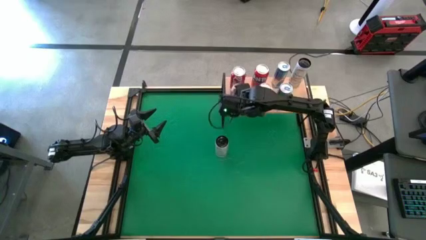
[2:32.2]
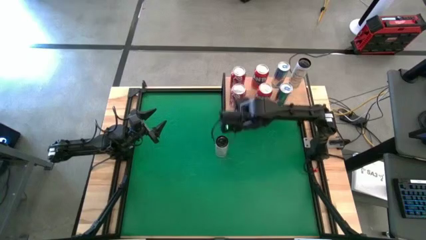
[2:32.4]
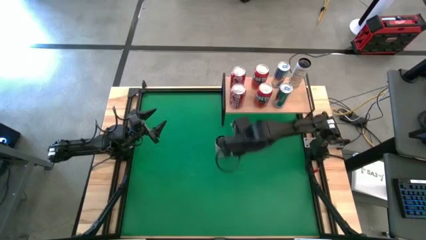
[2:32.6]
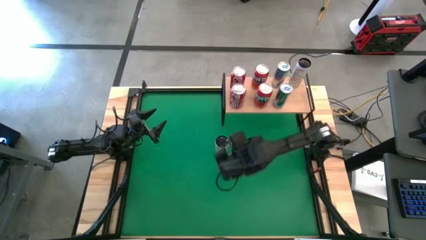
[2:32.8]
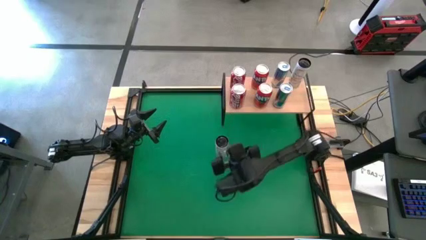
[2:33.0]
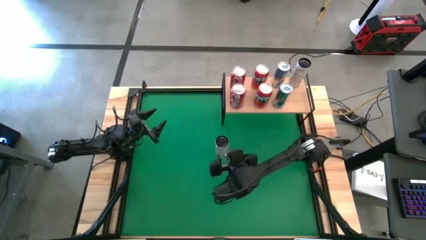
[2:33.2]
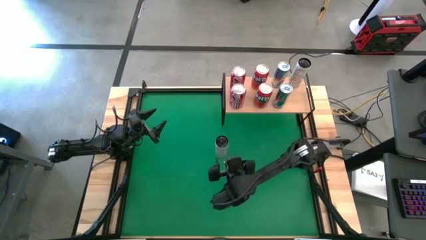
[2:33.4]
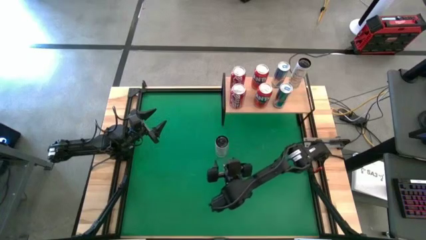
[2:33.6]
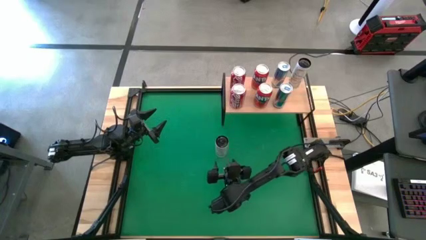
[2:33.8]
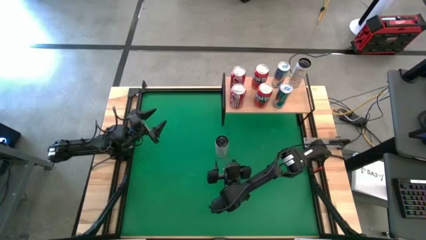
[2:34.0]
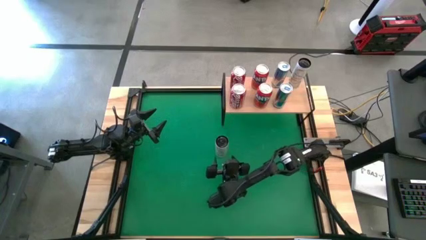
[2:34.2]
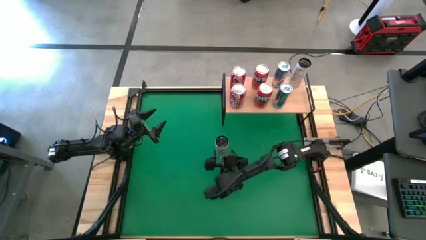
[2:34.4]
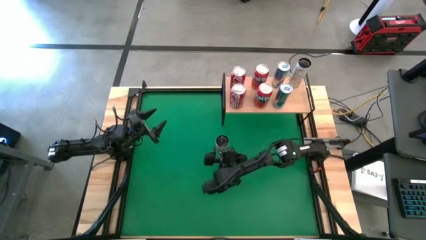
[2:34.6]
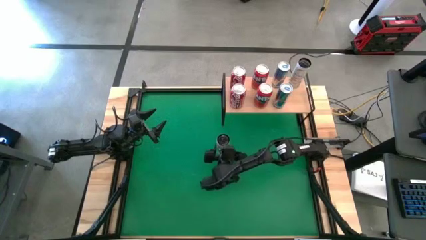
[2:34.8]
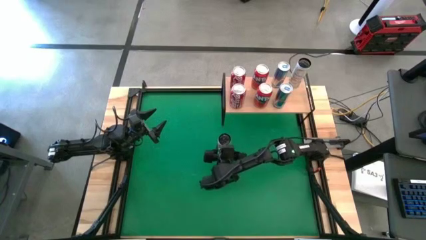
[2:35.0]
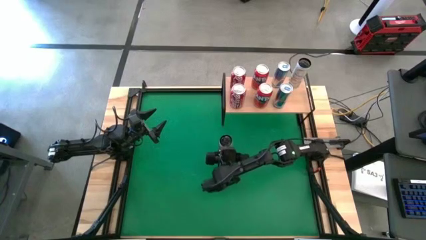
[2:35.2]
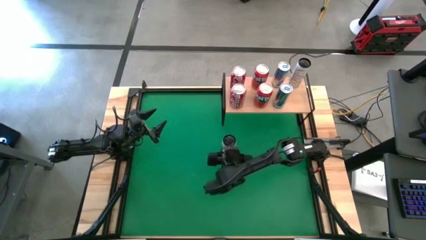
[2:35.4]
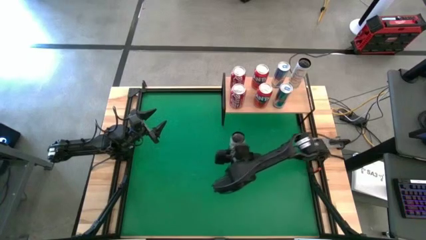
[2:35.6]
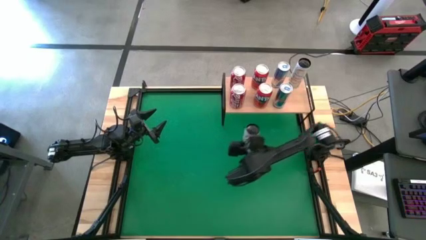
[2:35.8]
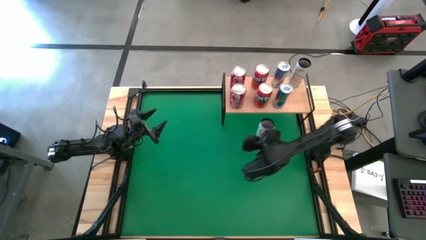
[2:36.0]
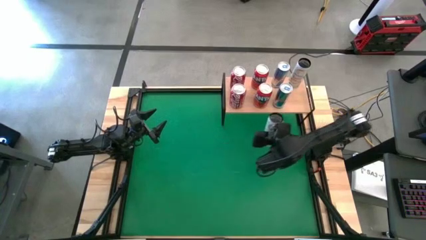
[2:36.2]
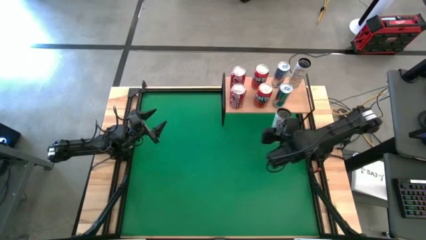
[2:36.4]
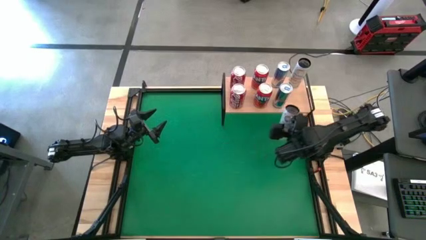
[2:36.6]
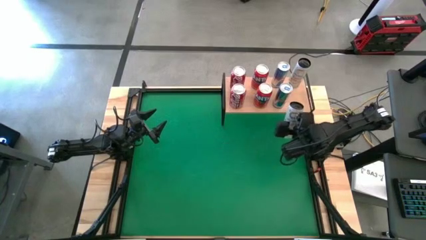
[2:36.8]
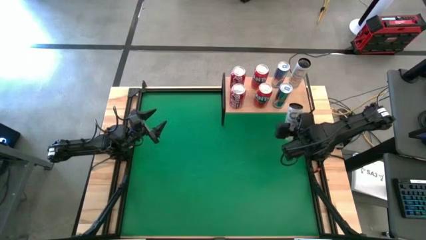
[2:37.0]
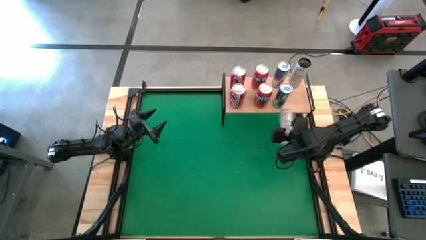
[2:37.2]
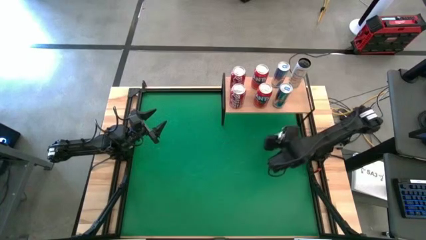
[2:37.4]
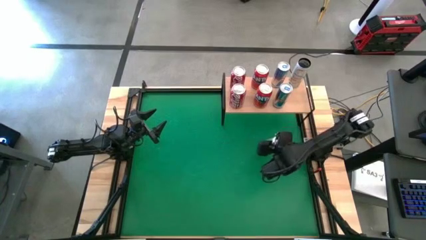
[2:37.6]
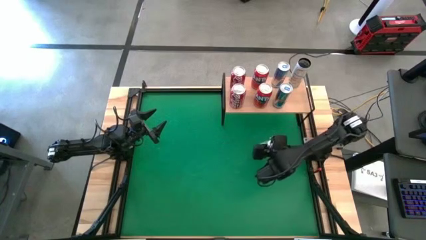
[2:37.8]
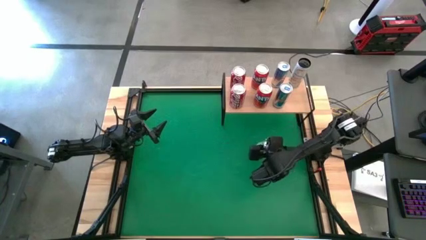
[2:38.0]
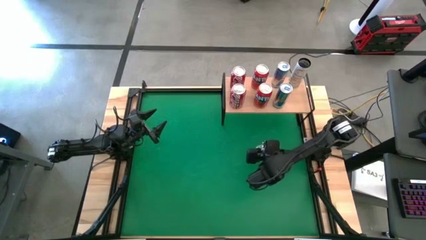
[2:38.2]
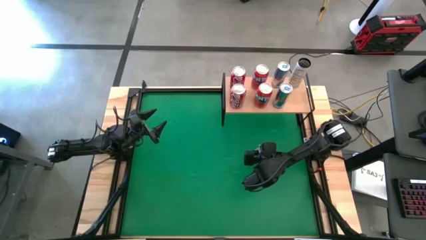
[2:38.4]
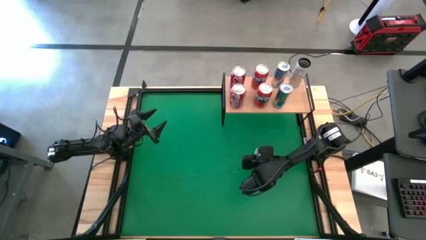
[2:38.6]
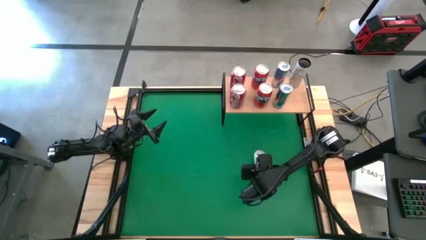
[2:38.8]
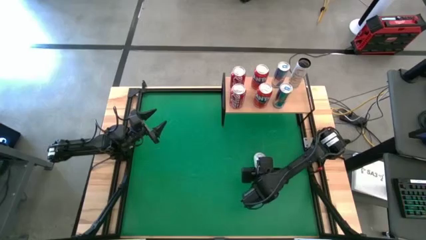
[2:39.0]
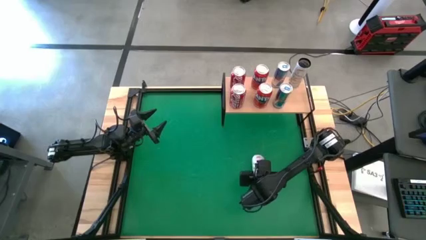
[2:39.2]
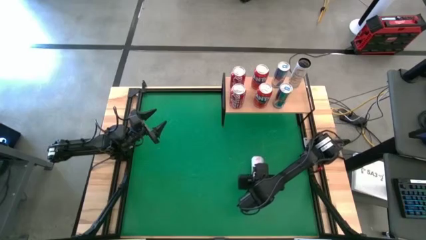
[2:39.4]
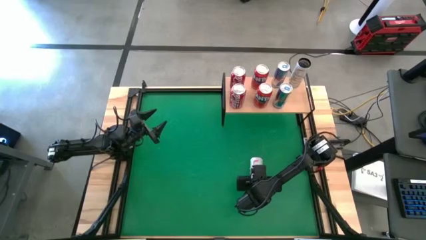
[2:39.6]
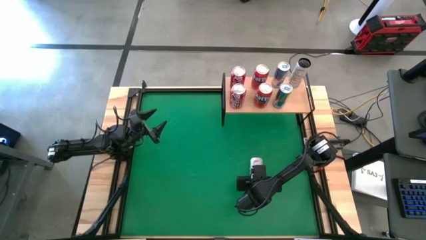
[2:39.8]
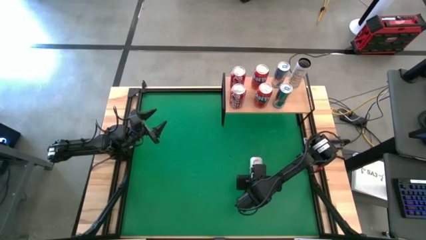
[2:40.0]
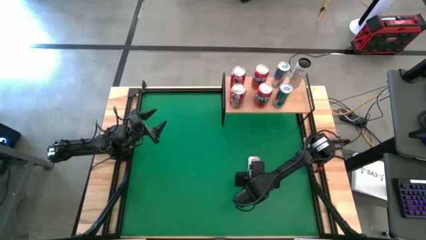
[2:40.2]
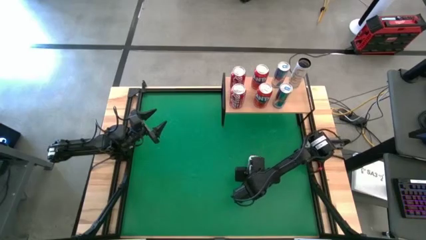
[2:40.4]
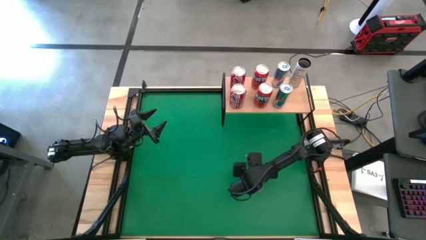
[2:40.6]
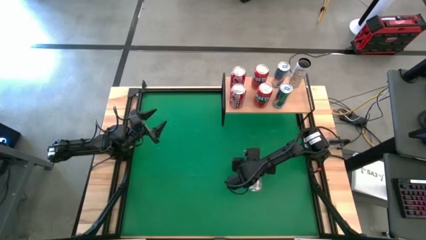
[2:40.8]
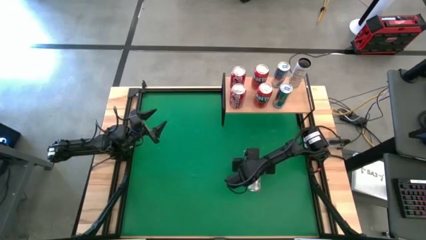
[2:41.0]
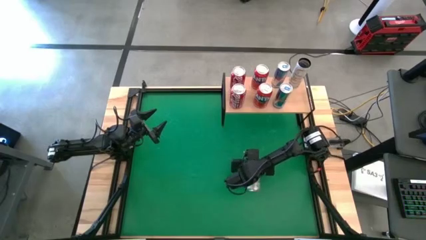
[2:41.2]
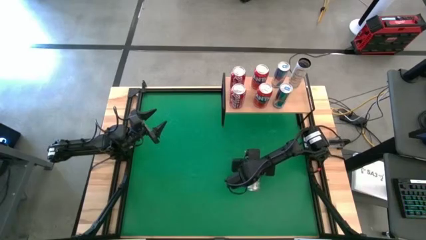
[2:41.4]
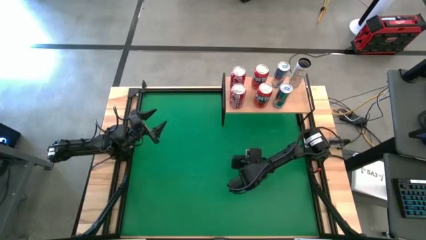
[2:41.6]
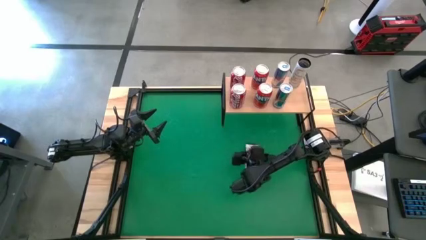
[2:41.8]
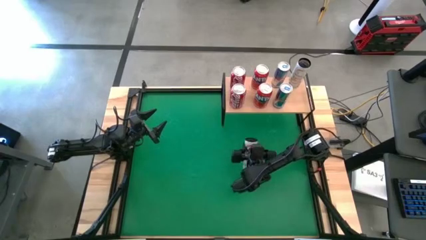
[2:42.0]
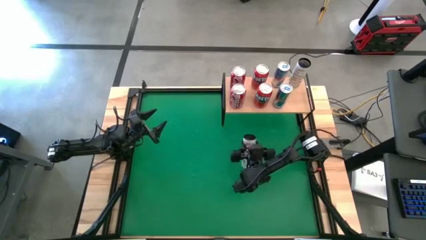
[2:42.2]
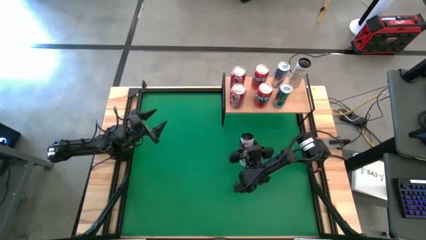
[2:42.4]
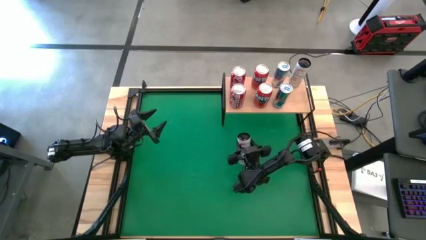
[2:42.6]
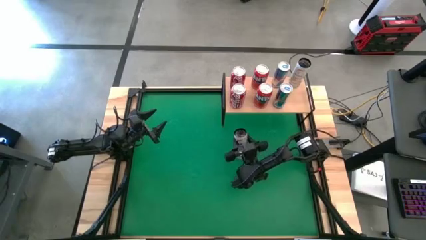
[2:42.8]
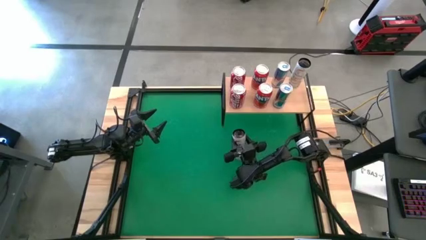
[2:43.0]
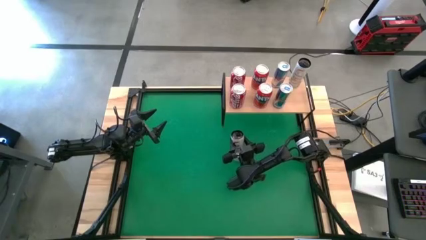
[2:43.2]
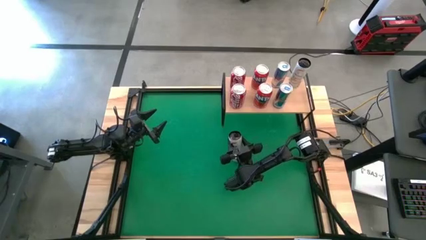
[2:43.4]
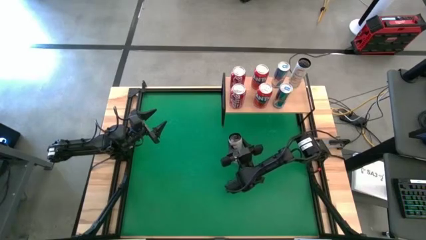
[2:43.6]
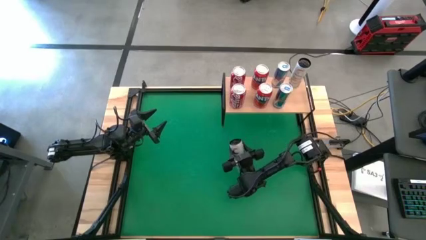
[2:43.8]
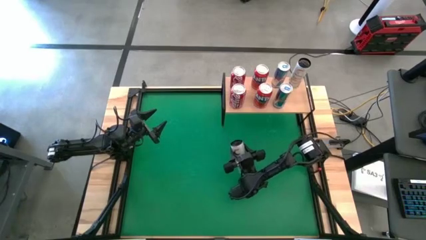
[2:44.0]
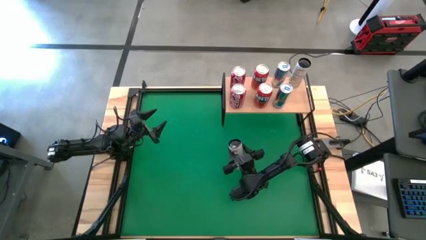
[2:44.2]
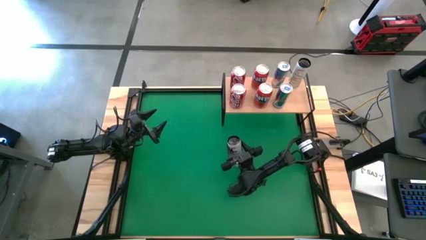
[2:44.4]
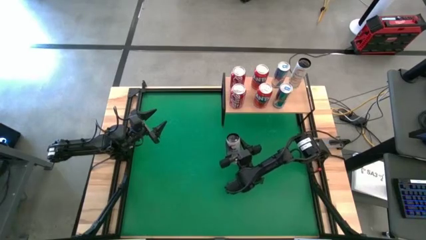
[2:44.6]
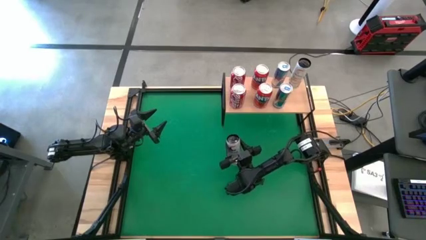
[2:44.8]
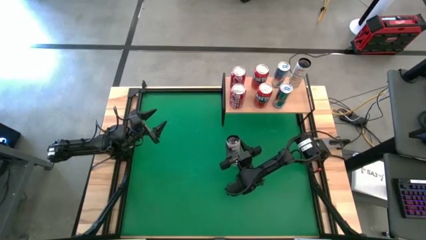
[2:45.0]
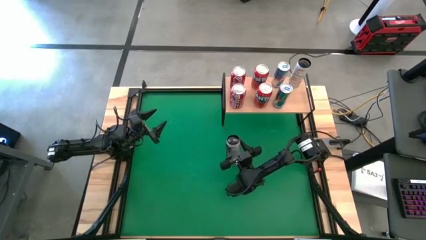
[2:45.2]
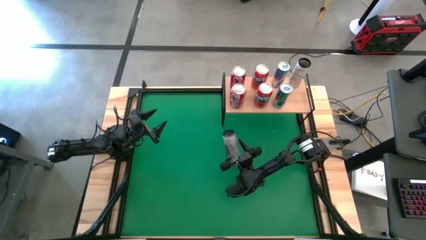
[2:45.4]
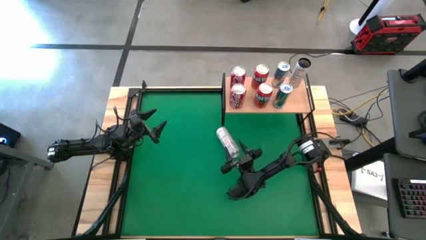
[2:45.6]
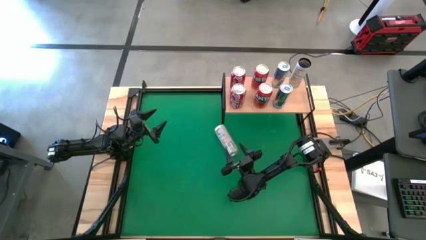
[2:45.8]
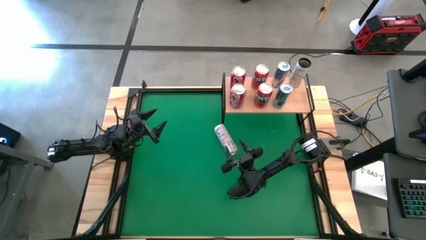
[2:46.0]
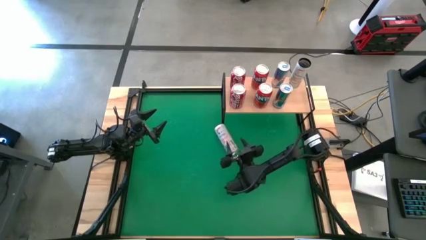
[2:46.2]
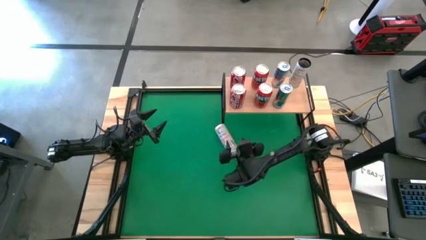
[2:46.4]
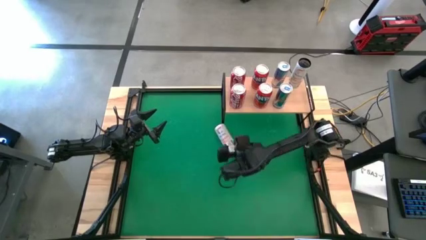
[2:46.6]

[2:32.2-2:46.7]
Task: Place canned beverage on shelf
Put the white yellow soda can on the shelf aligned with the other white yellow soda can
